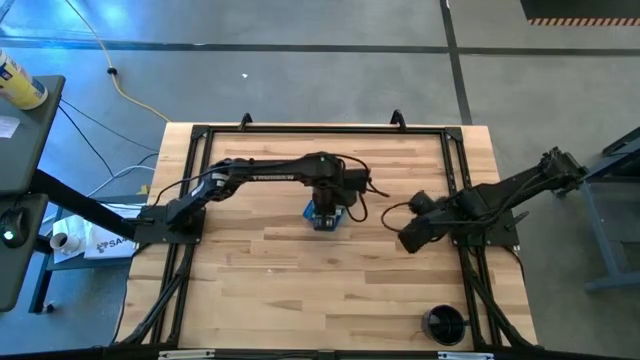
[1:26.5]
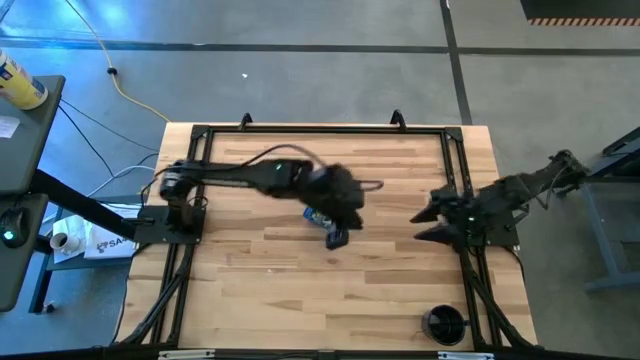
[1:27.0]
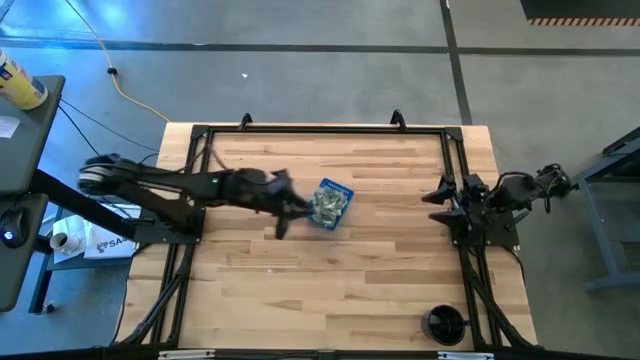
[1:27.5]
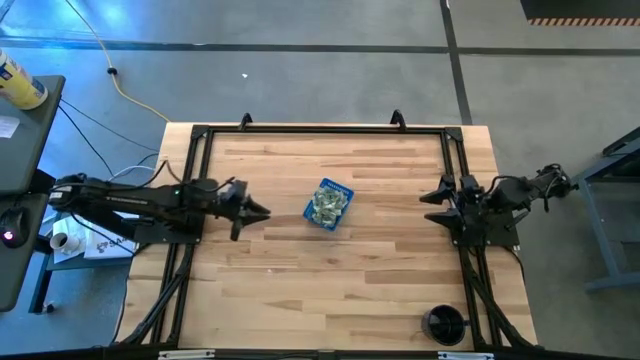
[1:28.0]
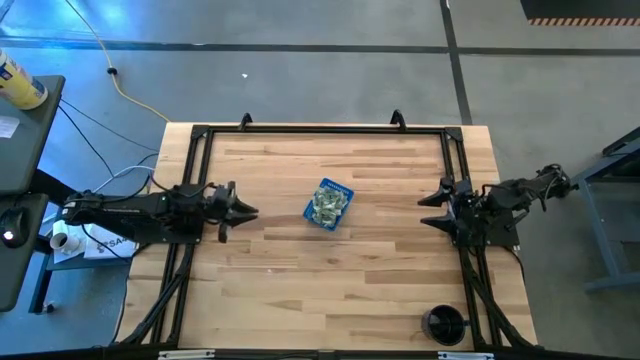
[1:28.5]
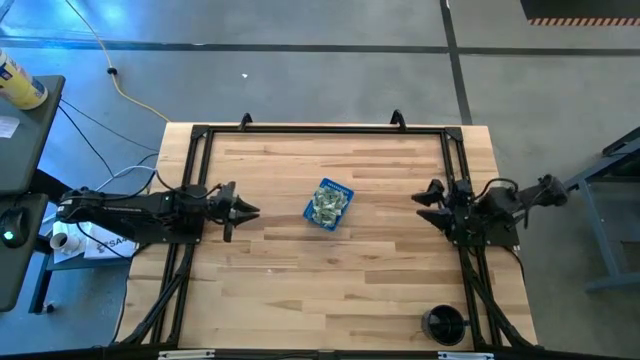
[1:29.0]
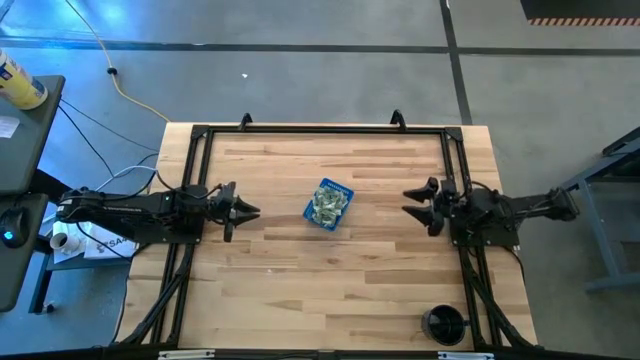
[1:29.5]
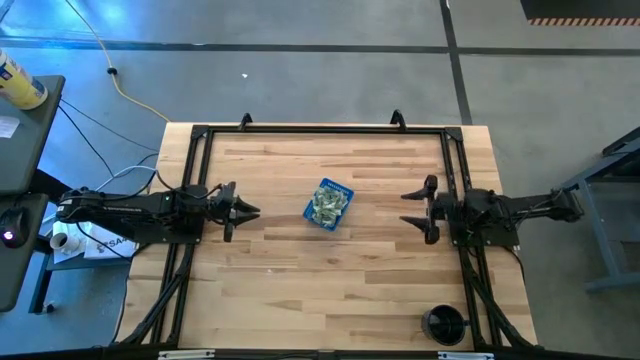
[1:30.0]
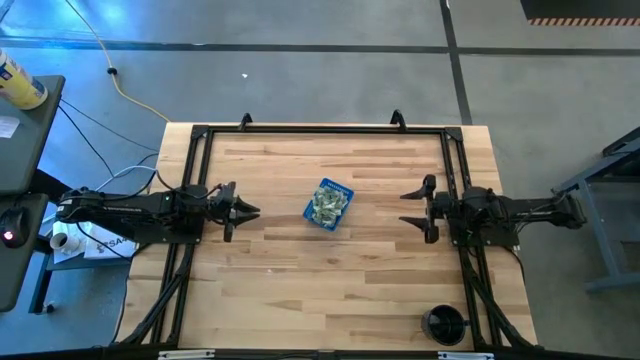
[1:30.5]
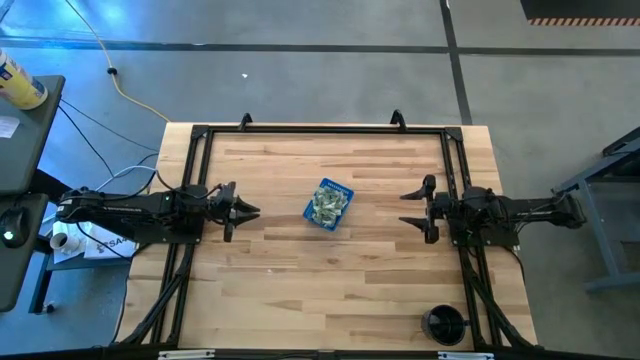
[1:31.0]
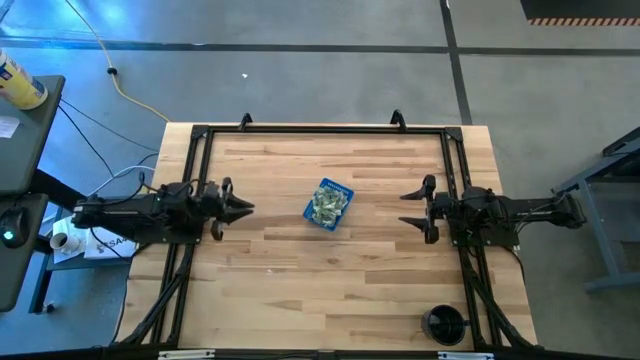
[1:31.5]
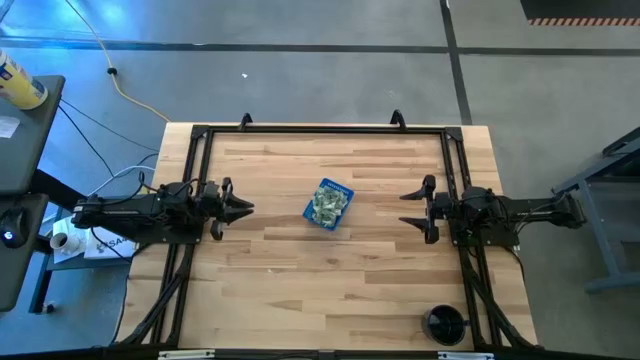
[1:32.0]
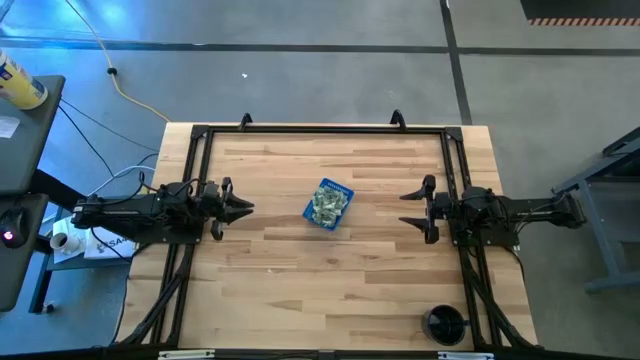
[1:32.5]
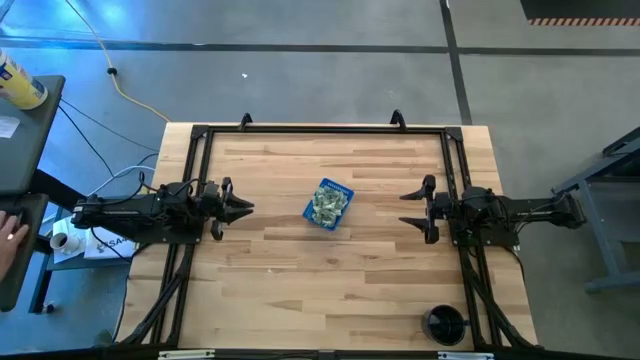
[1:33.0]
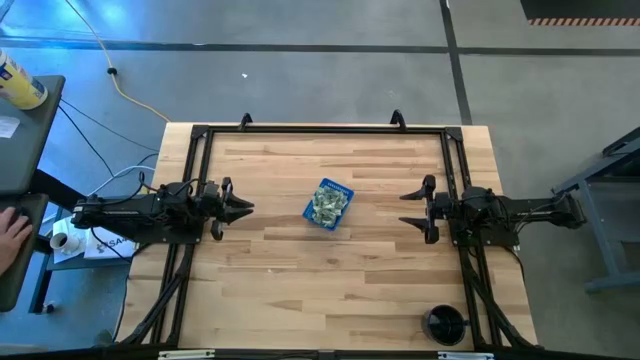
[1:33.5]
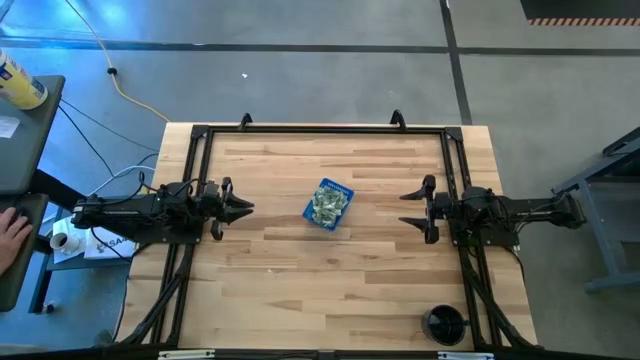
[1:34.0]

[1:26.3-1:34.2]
Task: Pick and place Stevia / Truvia into bins
Return to Home Position

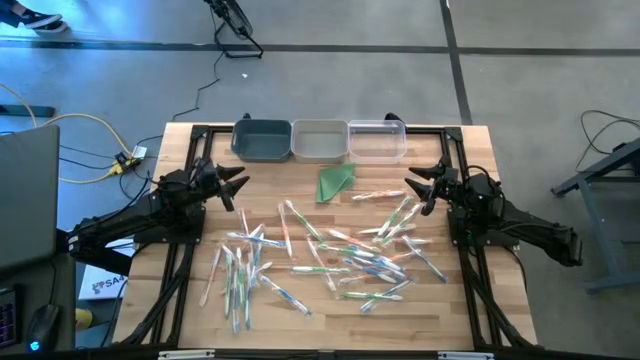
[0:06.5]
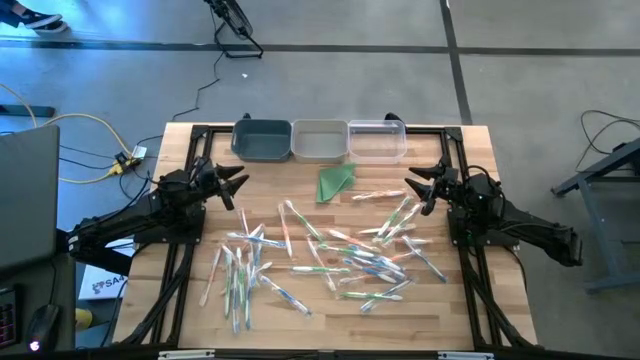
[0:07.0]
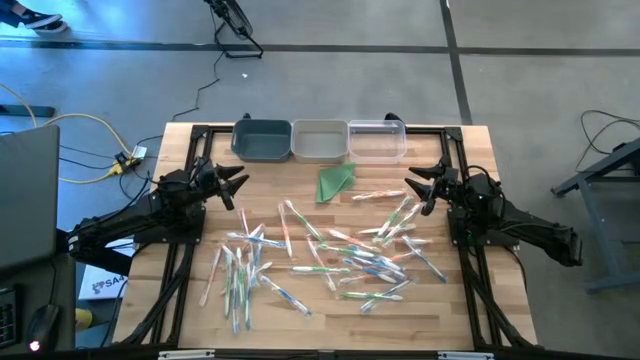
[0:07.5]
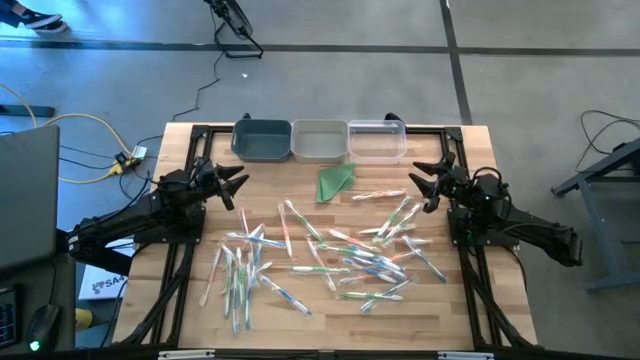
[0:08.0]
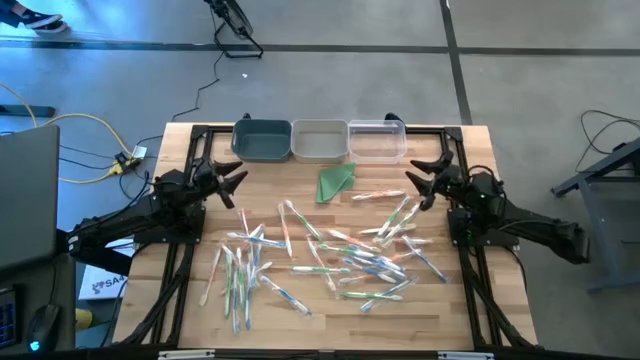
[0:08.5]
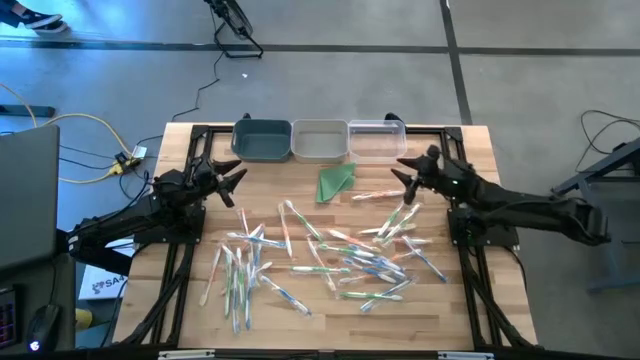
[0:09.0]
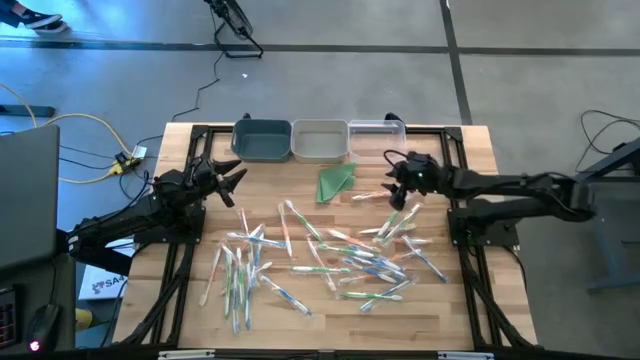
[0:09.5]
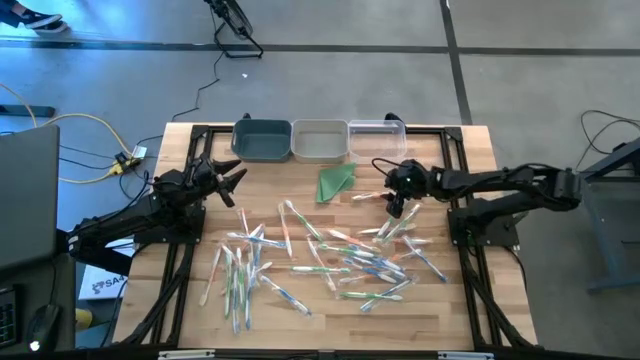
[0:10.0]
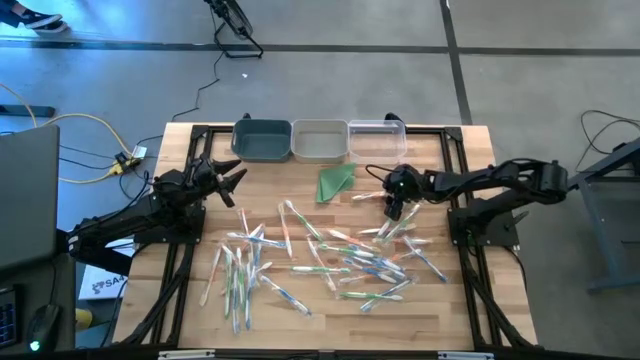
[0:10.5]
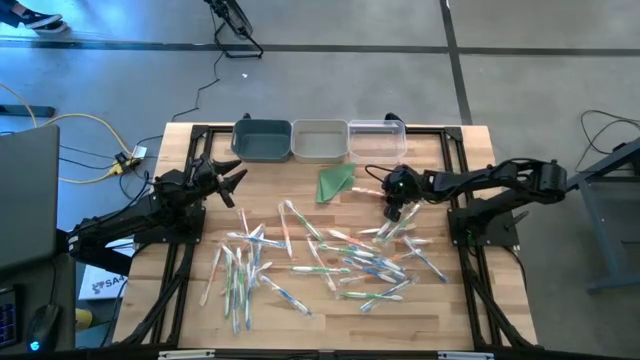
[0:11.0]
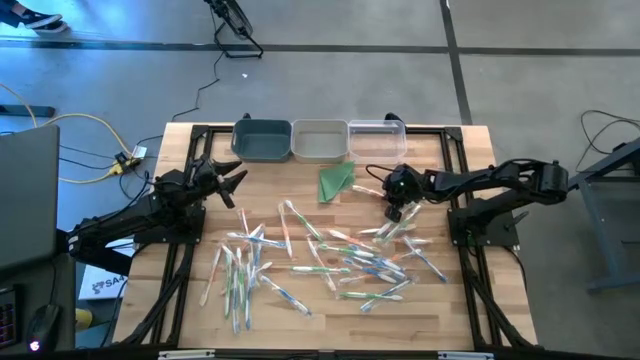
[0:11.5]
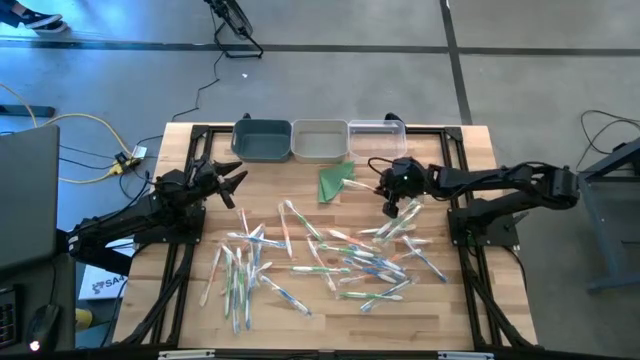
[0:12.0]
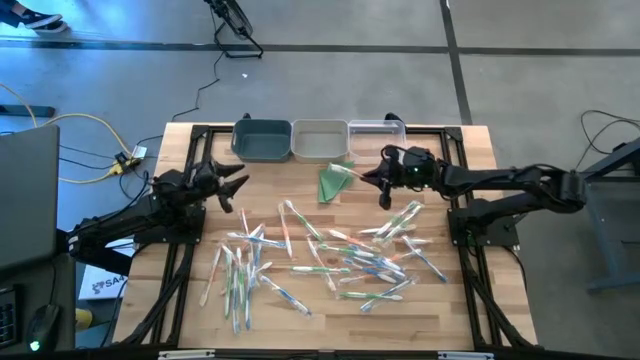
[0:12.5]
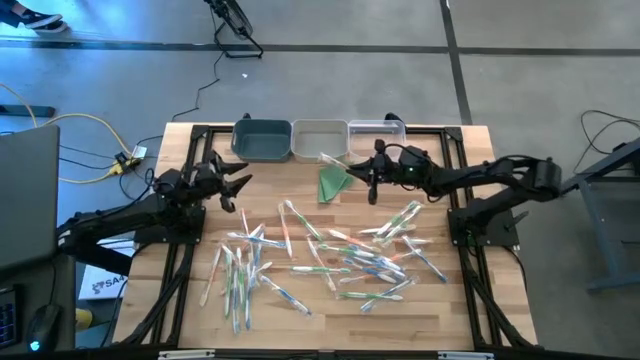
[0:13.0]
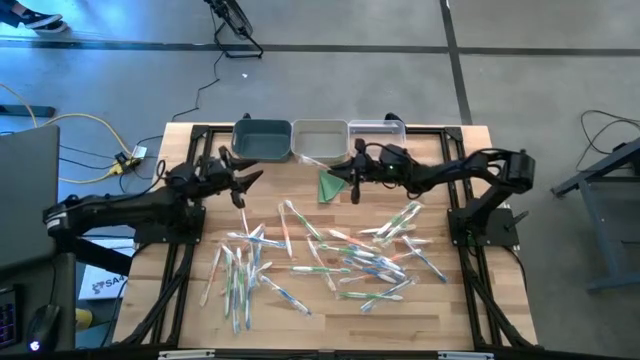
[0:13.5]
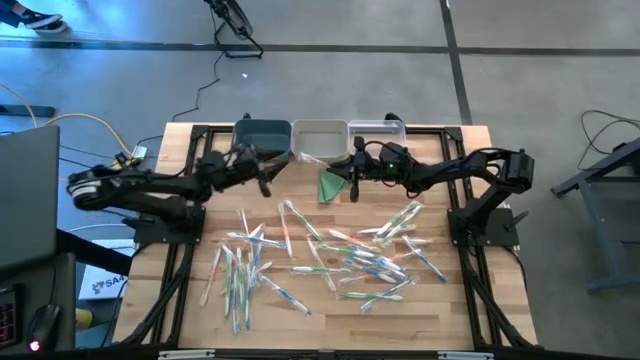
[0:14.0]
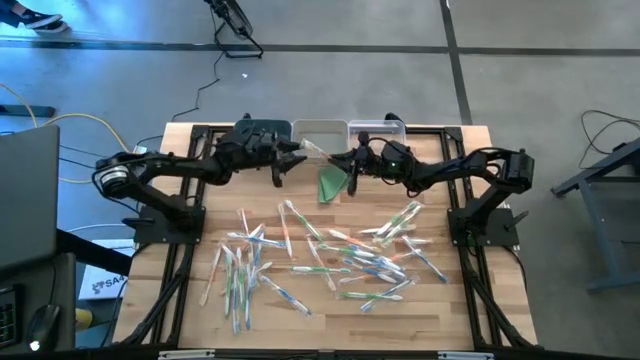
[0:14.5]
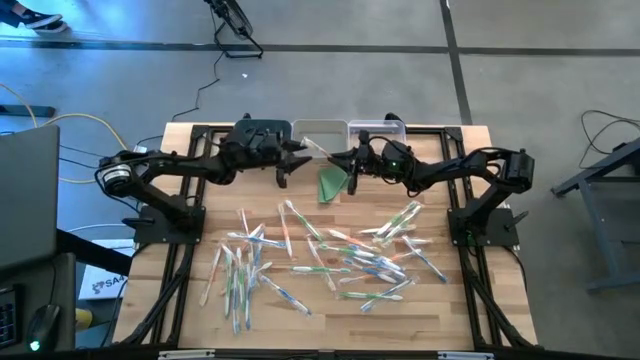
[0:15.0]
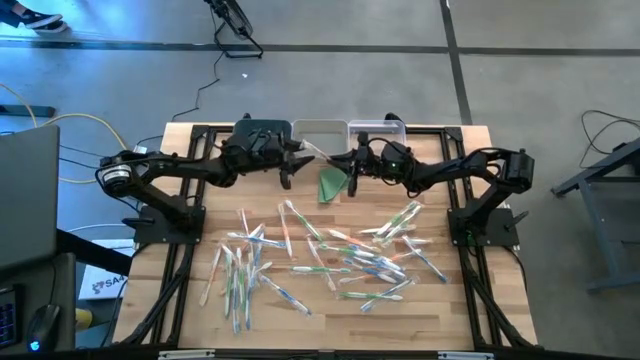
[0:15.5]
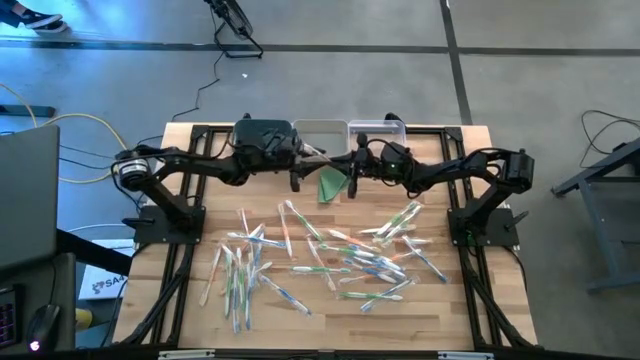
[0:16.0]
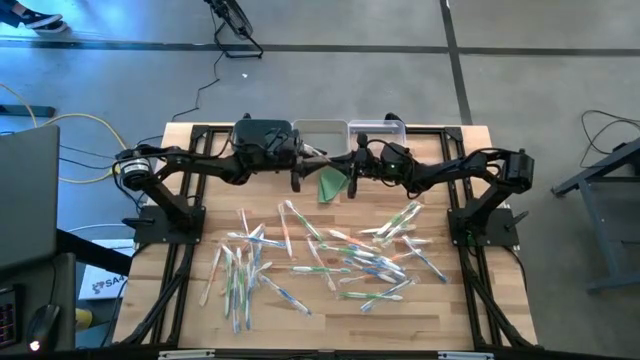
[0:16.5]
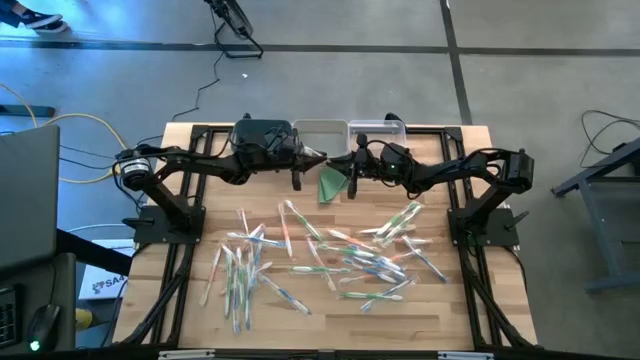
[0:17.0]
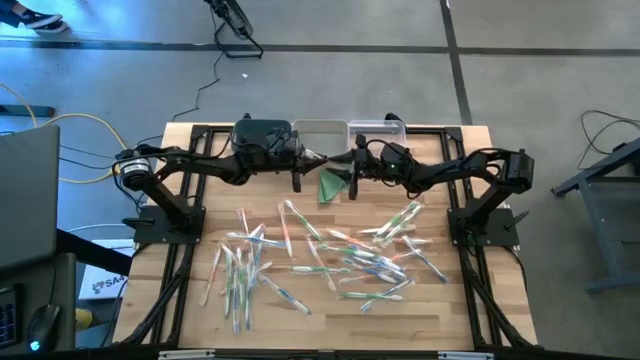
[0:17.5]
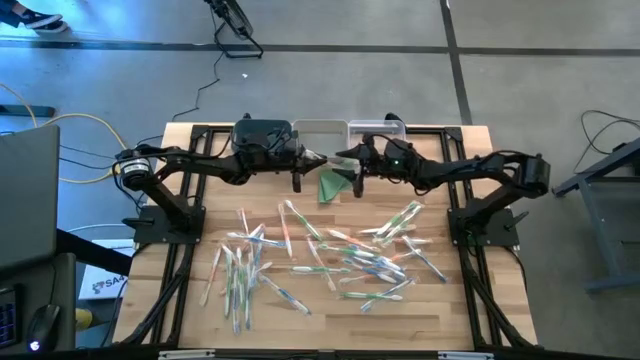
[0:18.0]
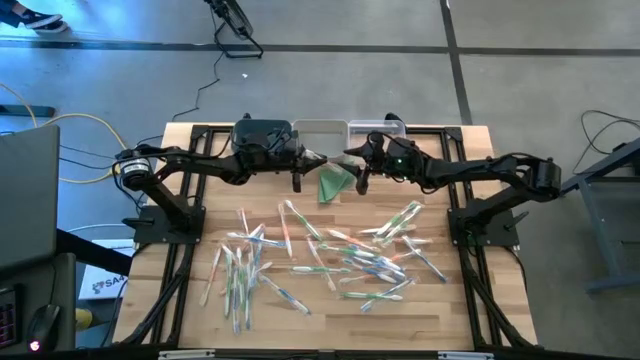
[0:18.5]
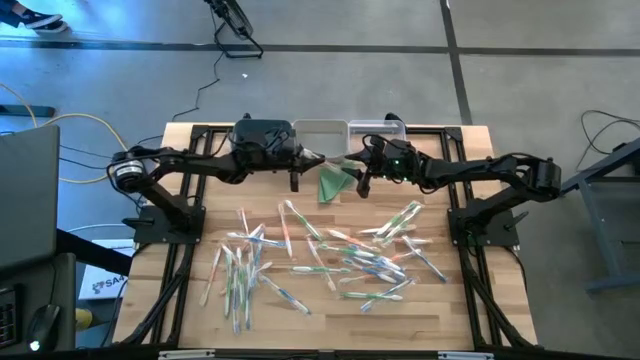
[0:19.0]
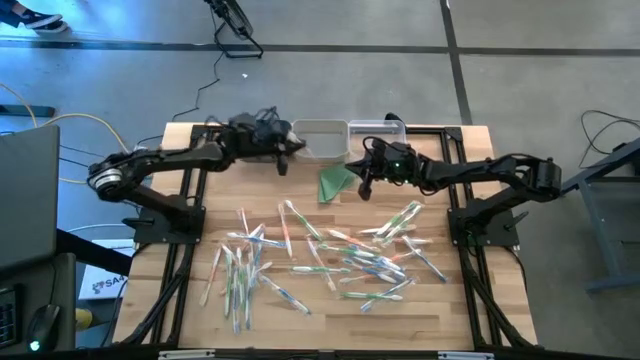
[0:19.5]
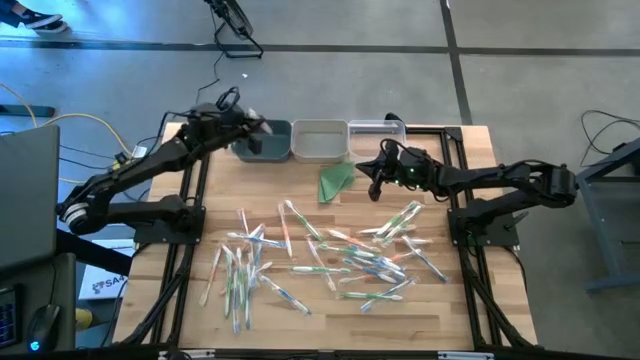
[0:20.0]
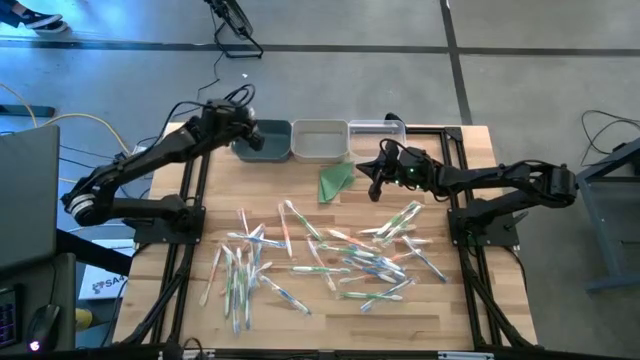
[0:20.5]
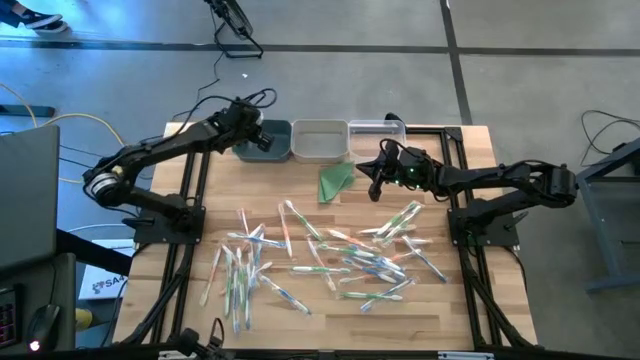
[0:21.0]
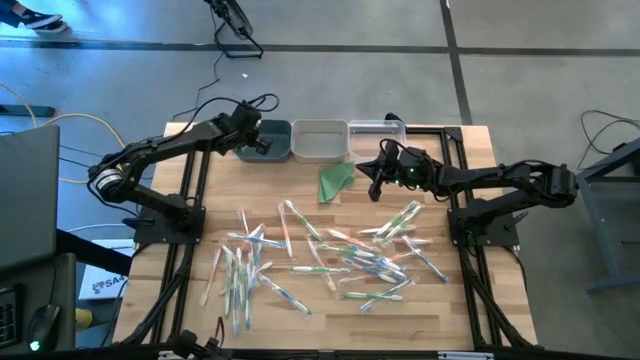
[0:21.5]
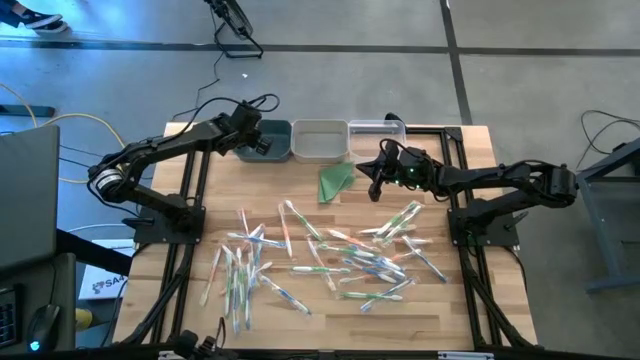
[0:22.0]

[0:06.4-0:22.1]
Task: Pick & Place Toothbrushes
Put the orange toothbrush into the dark blue bin
